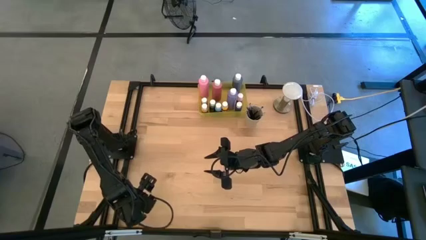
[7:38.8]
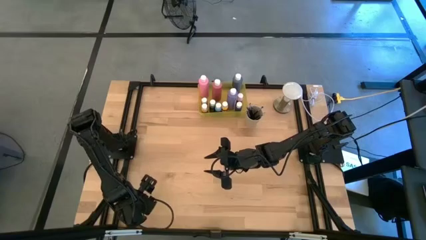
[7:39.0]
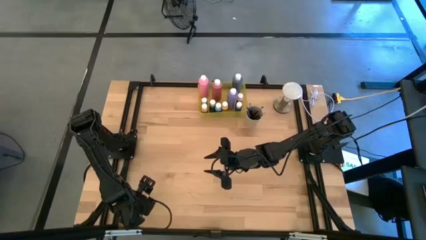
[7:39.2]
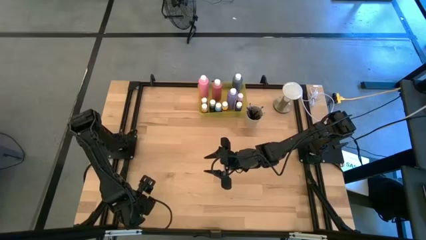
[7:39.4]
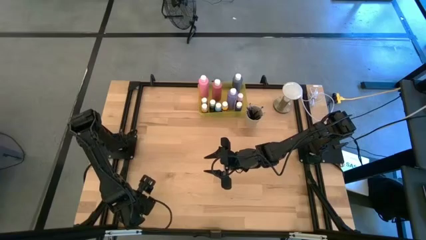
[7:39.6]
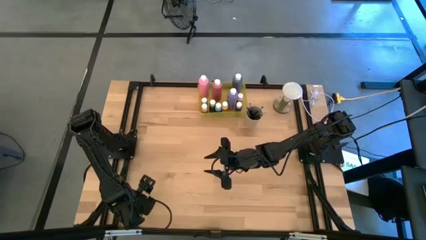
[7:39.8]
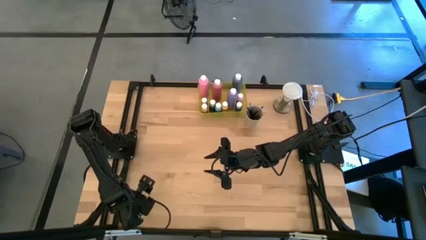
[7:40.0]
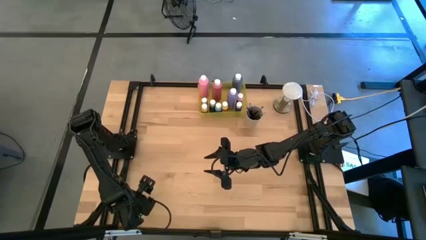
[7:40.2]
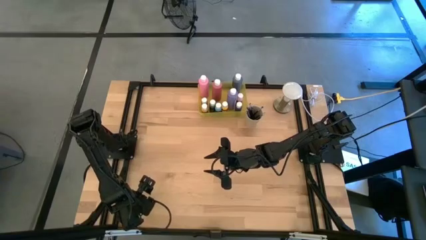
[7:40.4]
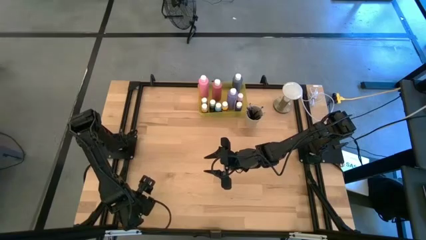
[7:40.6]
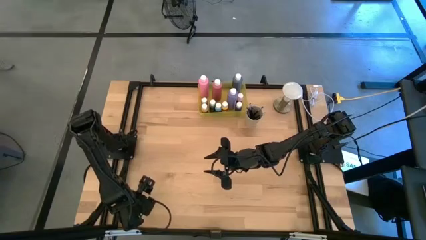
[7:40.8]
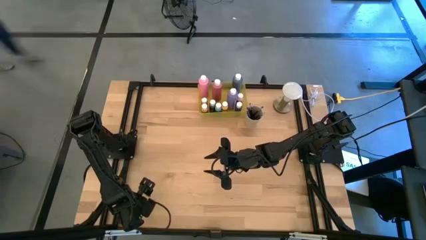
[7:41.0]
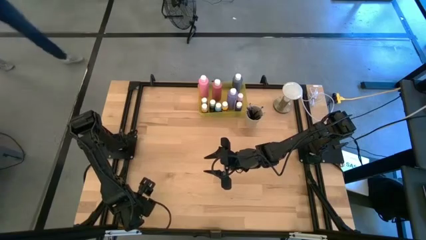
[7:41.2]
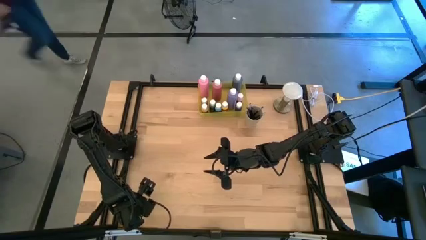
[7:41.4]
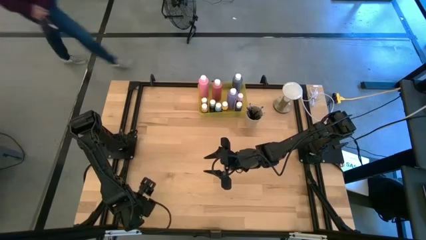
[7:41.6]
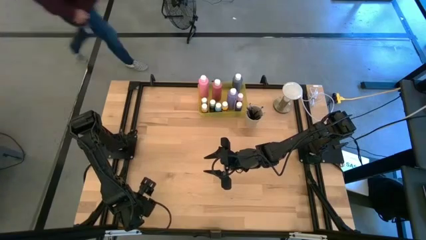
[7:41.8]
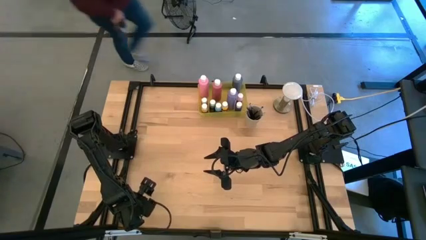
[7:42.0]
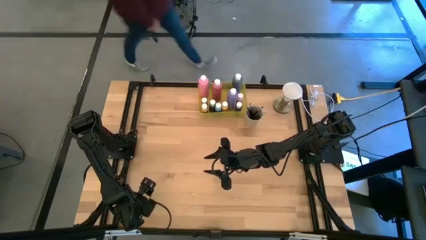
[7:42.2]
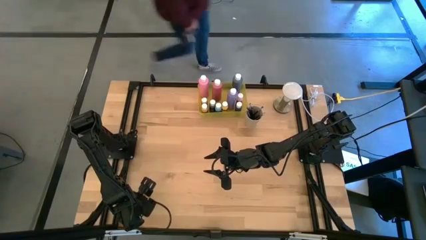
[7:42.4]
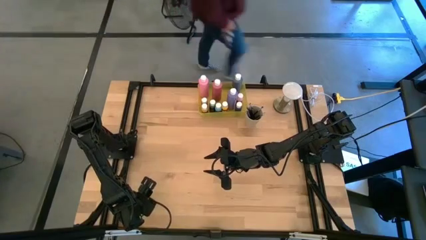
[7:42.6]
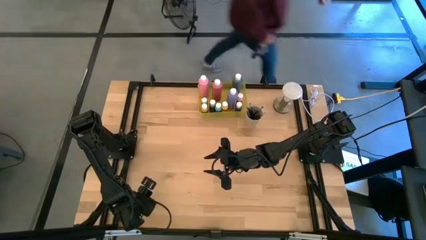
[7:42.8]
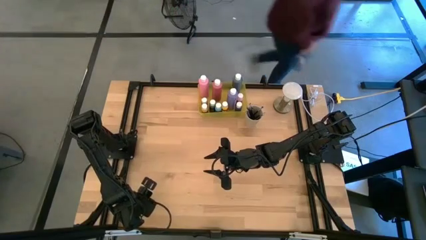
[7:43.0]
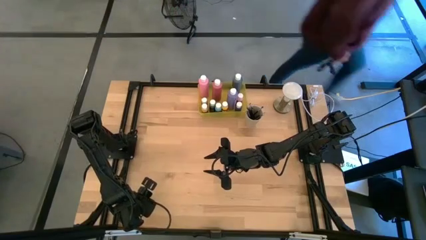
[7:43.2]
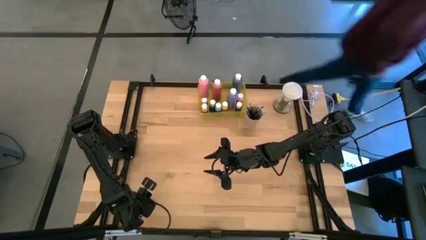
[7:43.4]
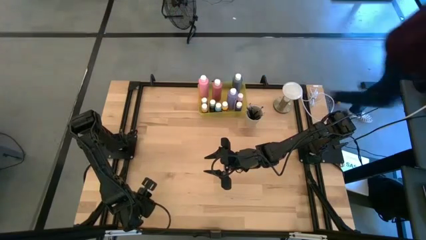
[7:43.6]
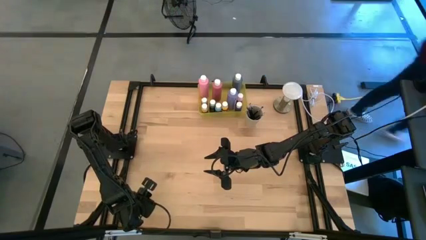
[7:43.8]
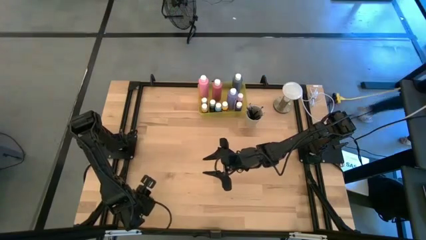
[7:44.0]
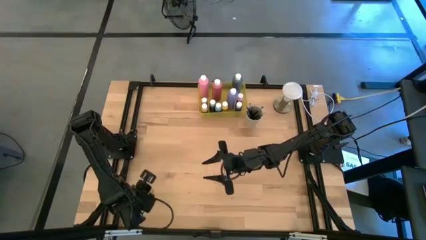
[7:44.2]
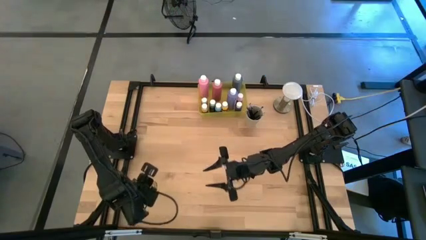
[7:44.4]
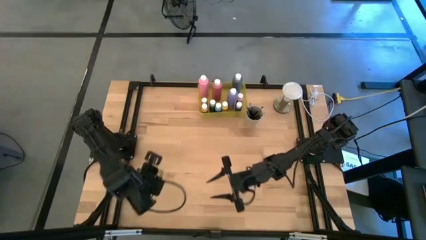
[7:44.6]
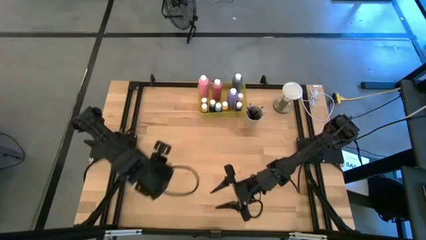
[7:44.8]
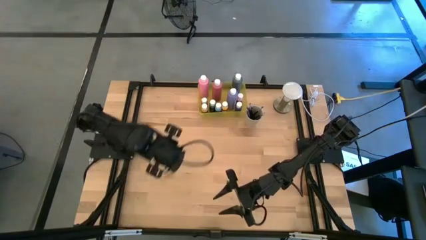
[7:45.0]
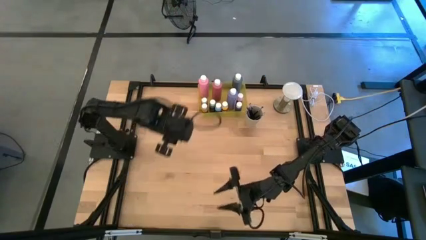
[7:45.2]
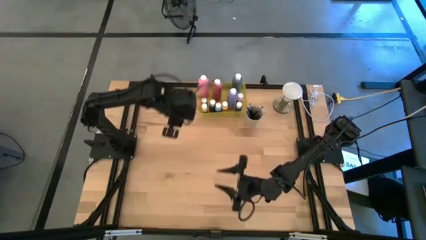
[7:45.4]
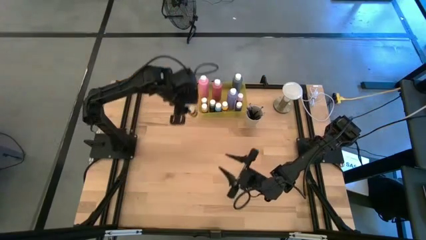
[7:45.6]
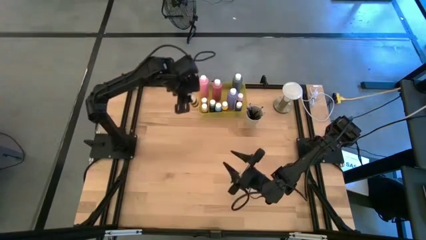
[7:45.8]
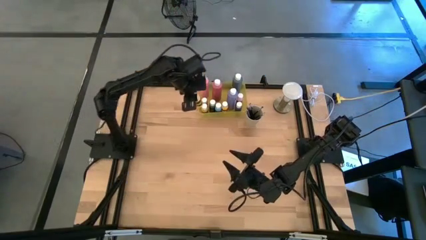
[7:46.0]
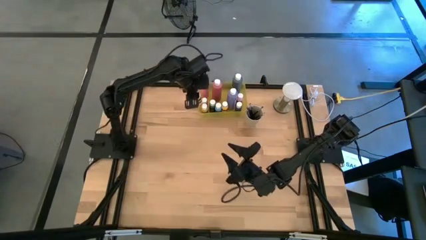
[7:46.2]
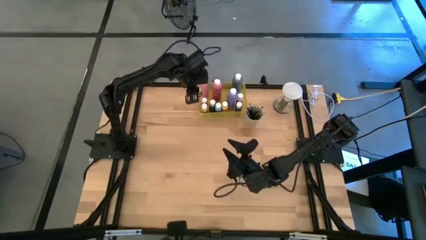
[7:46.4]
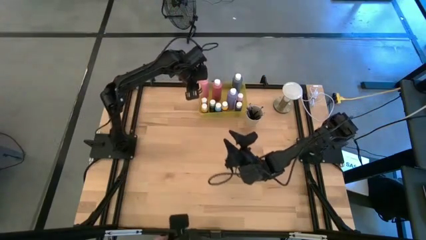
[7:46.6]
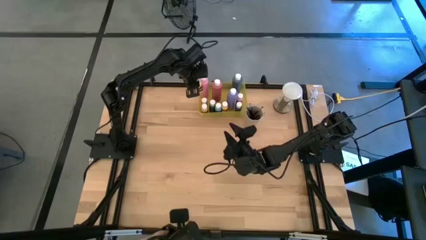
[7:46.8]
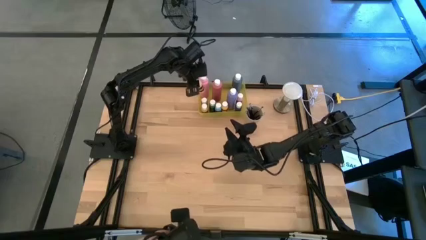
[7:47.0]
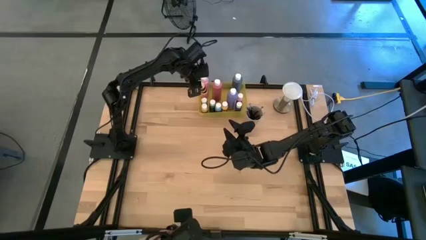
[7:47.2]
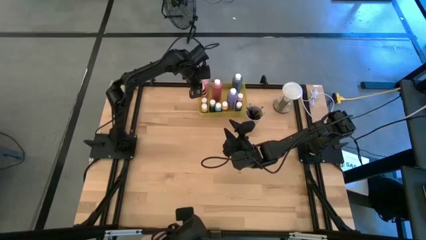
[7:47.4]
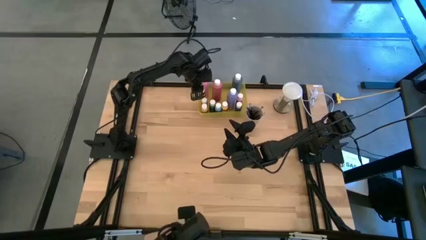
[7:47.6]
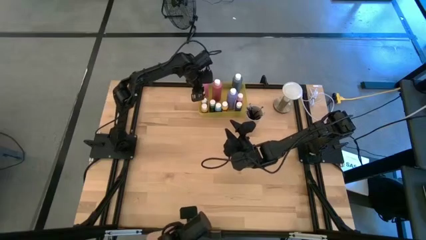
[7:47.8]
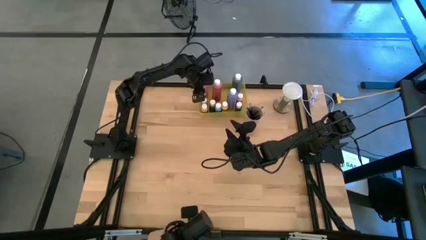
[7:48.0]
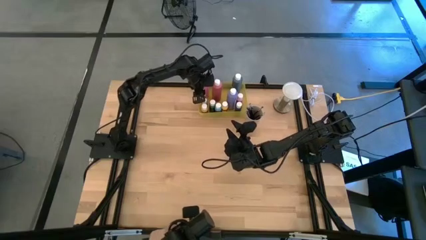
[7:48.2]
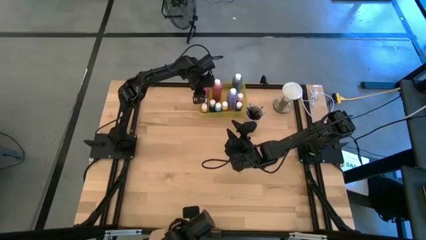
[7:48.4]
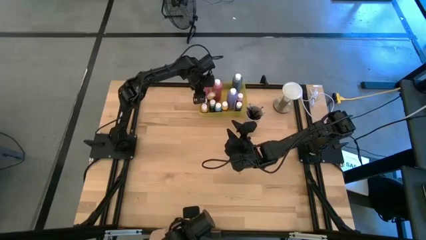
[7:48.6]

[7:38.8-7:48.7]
Task: Pick & Place Paint Supplies
Put the small yellow paint bottle into the yellow bin

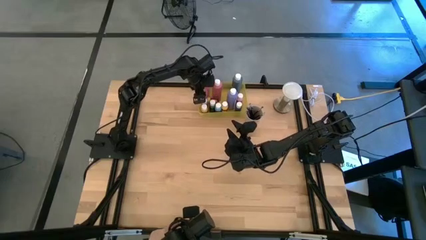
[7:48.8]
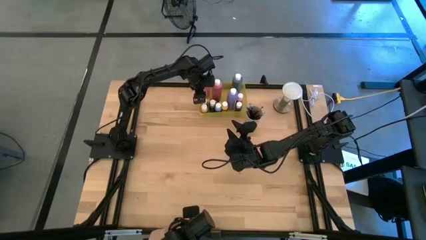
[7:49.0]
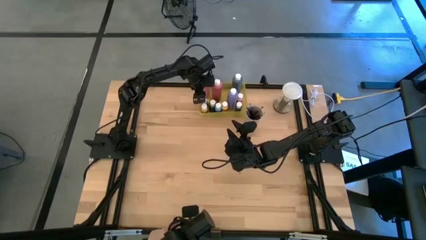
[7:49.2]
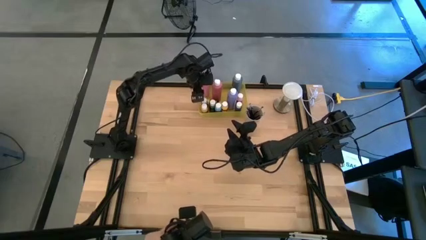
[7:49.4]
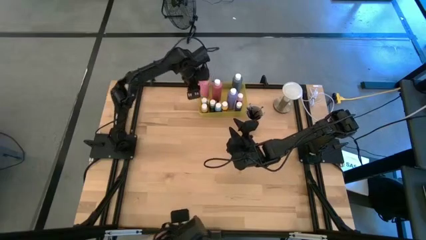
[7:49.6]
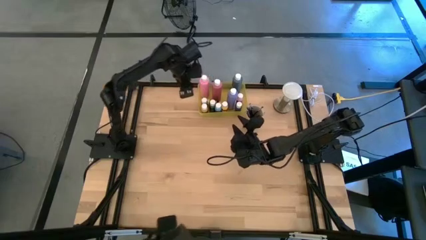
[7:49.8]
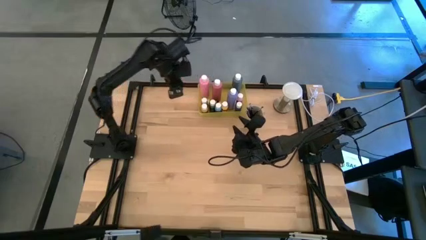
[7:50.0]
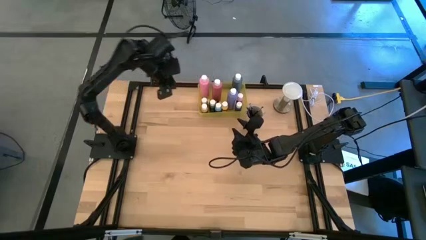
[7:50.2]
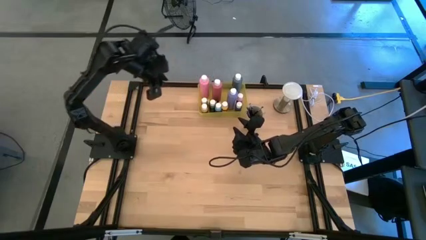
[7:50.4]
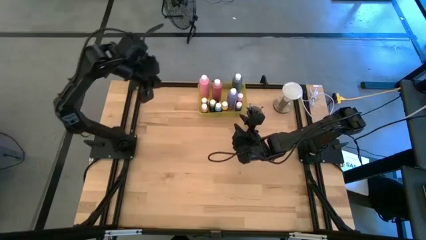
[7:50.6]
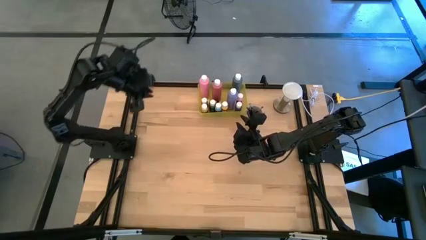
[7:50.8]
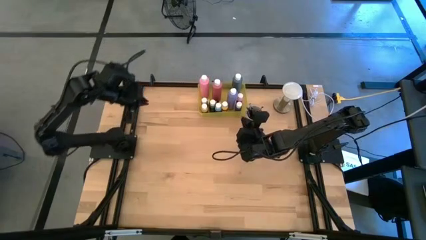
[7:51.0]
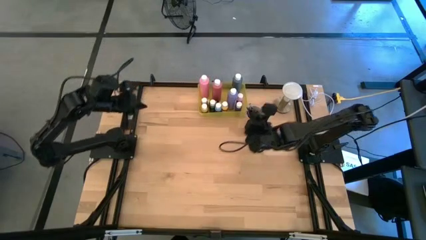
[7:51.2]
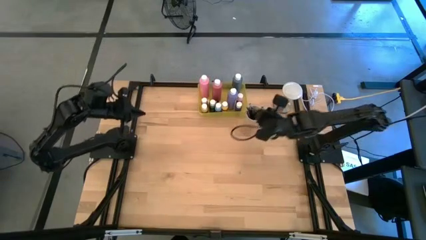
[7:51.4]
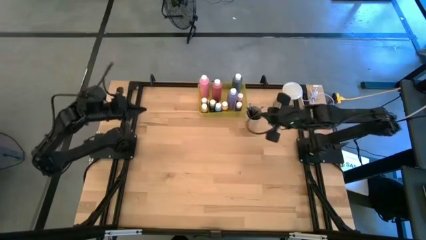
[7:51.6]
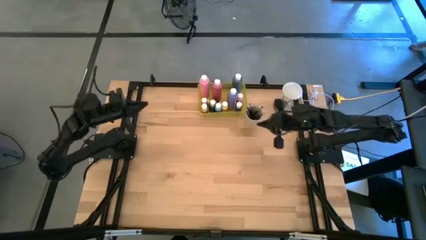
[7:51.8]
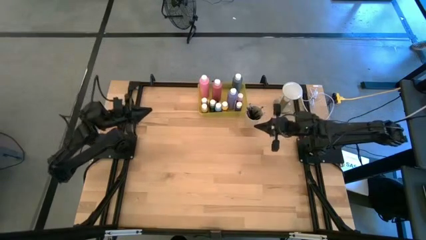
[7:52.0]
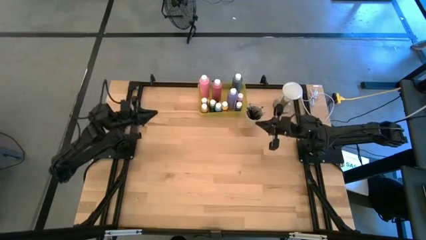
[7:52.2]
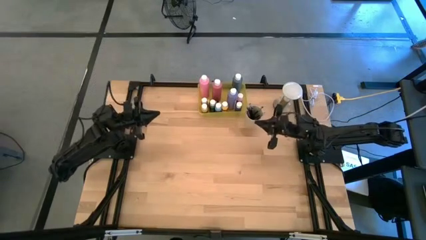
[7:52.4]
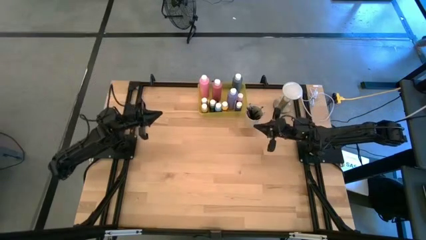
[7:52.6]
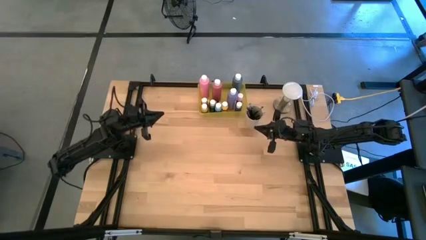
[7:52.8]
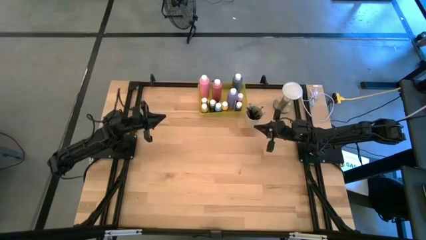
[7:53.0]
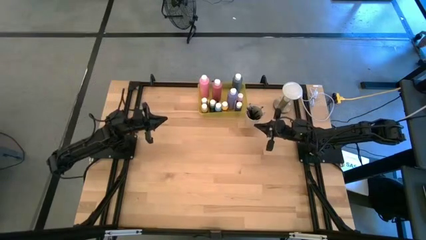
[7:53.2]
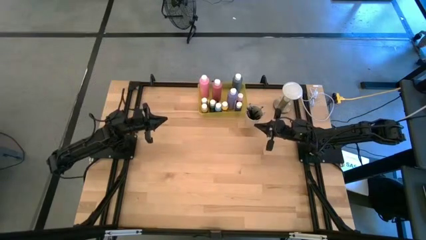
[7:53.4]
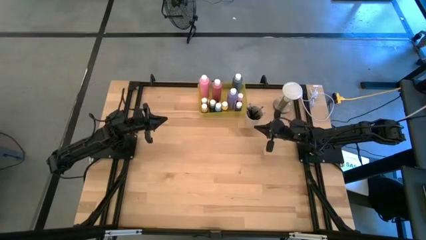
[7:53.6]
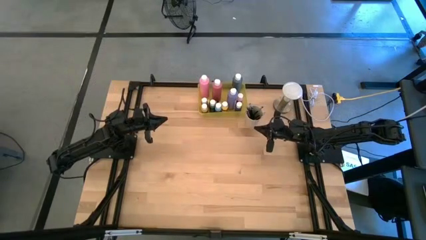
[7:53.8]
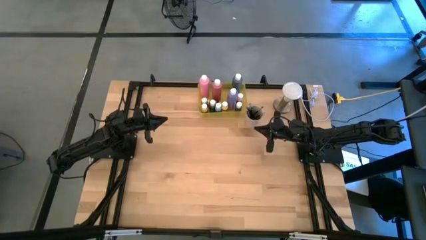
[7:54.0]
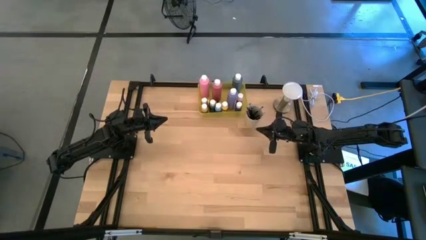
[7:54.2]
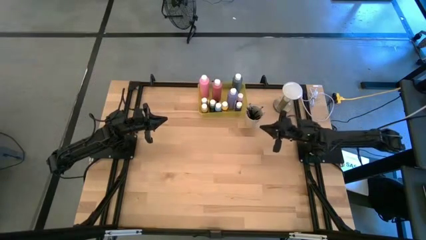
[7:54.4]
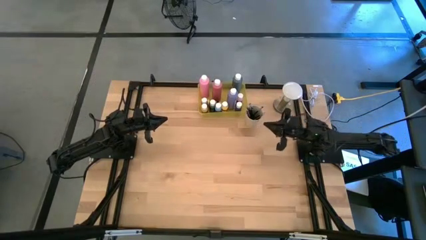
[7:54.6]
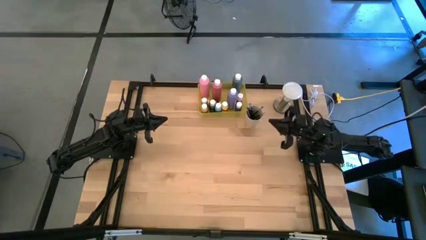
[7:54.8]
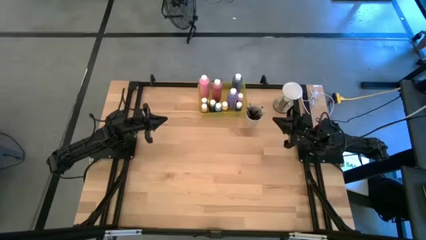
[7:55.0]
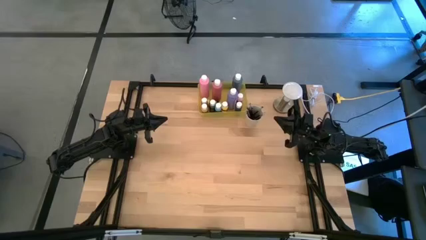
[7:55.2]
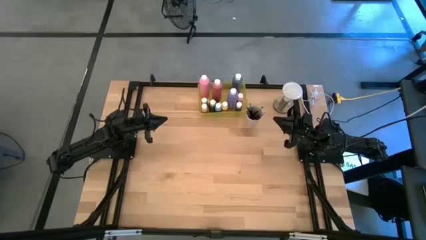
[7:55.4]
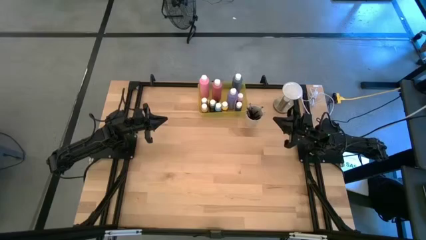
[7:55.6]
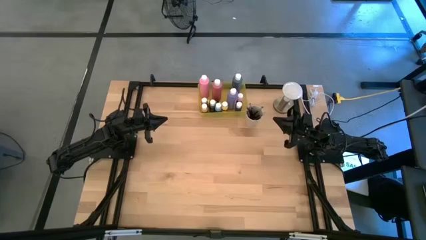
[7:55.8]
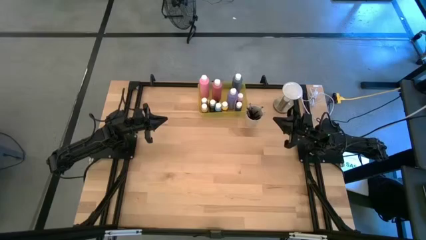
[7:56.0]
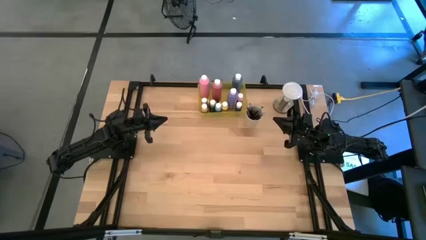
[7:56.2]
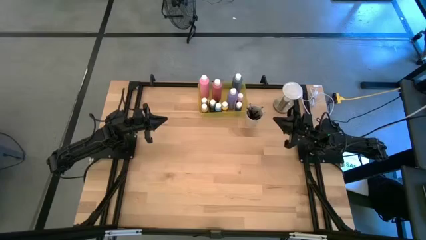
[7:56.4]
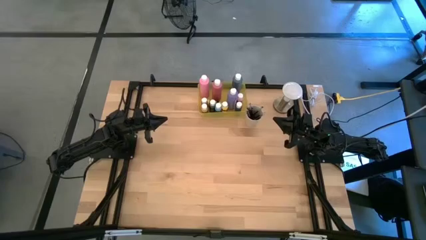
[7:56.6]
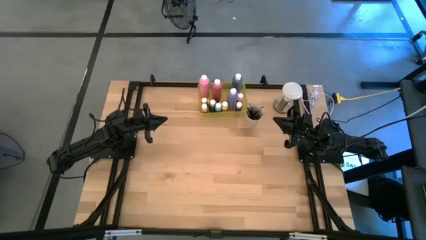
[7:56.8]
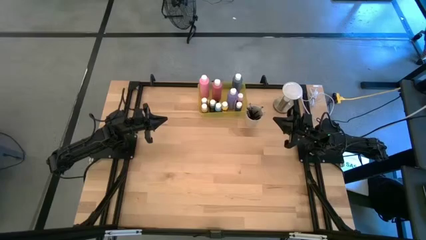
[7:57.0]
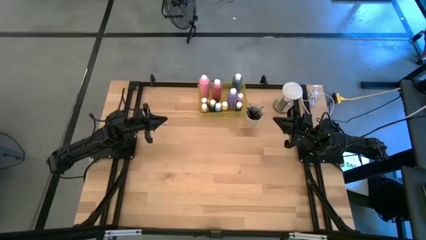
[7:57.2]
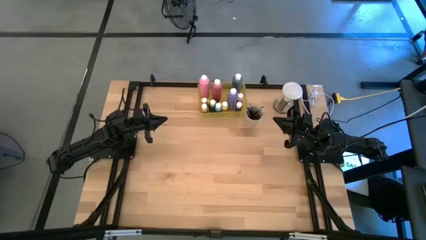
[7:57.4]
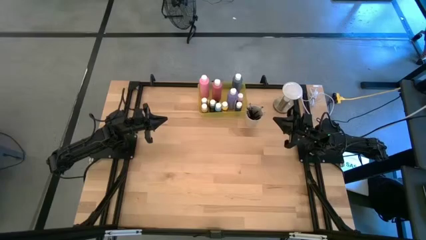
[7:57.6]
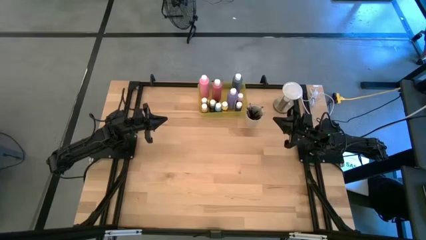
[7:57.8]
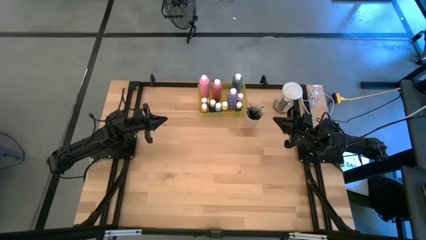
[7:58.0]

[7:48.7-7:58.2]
Return to Home Position
